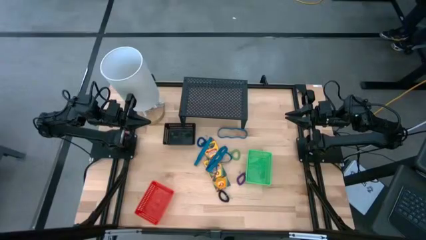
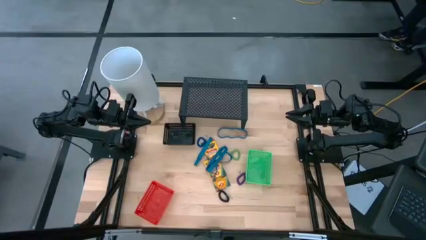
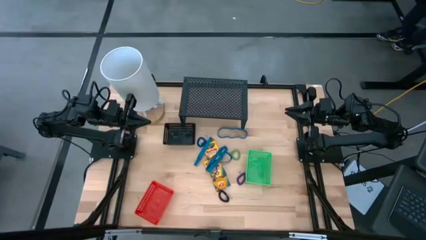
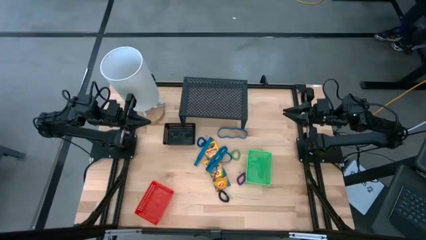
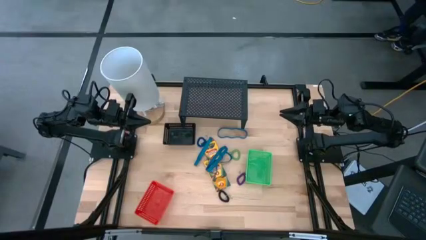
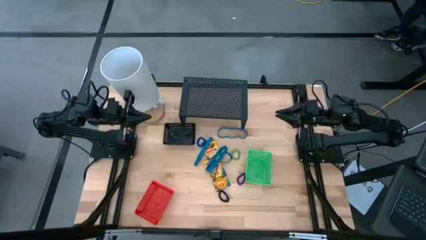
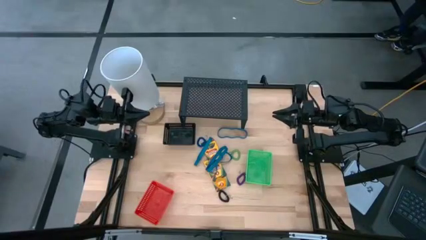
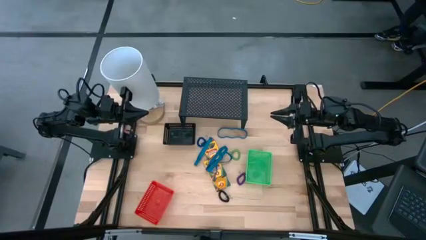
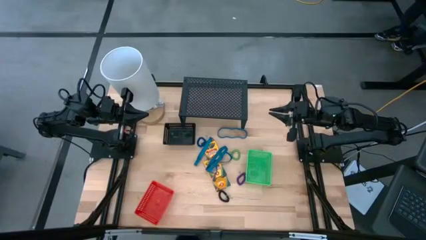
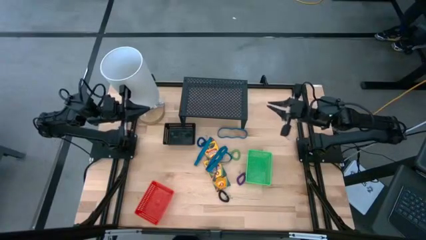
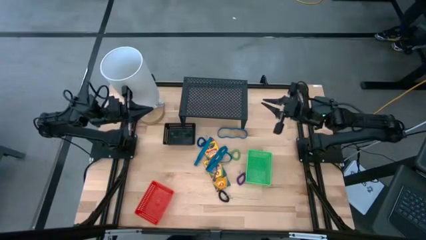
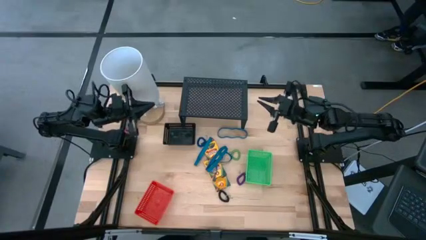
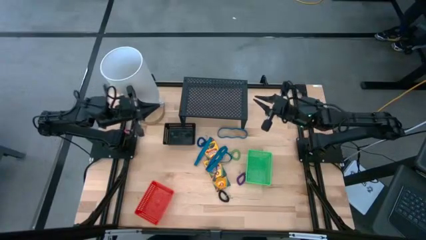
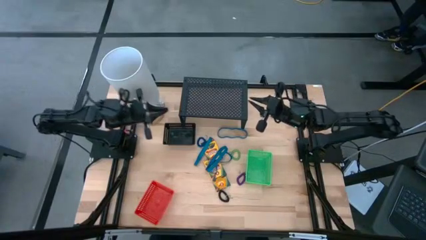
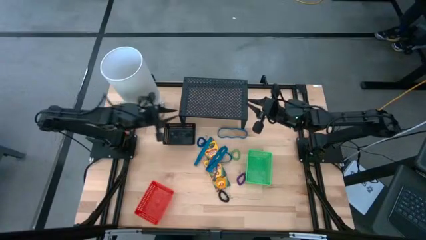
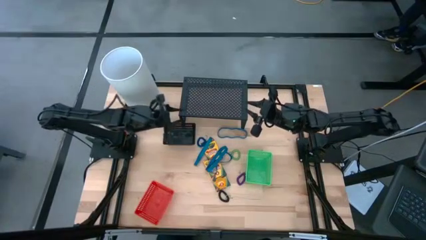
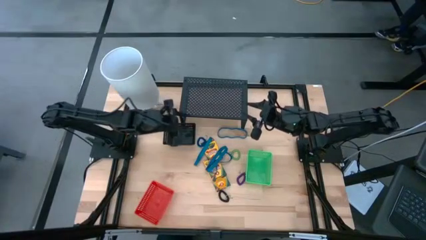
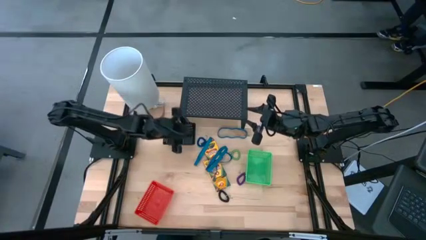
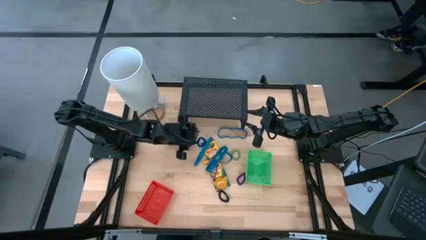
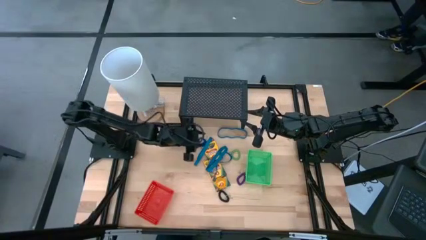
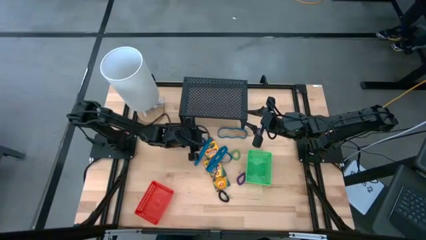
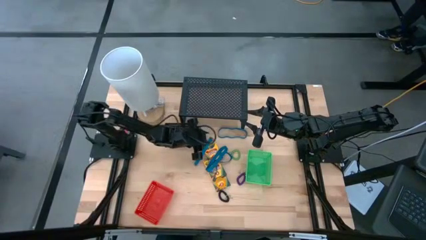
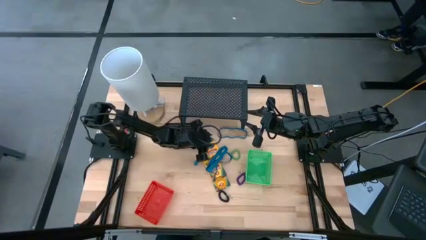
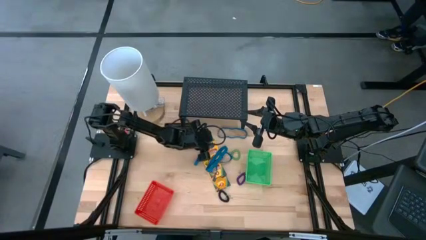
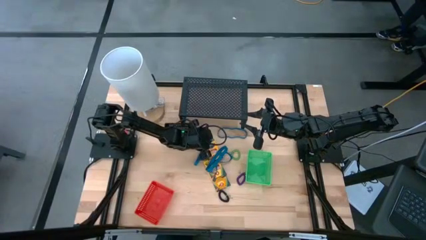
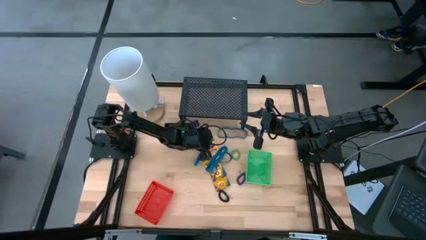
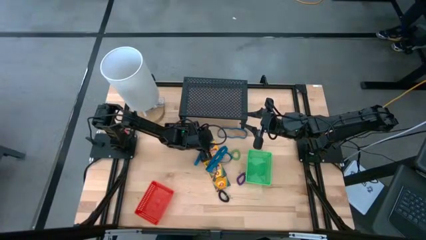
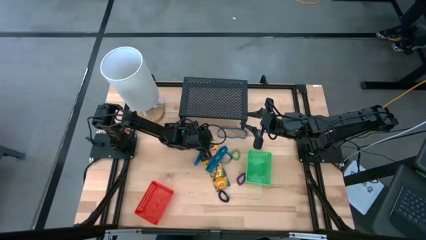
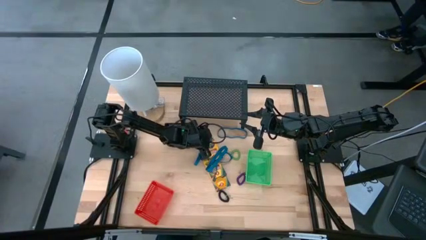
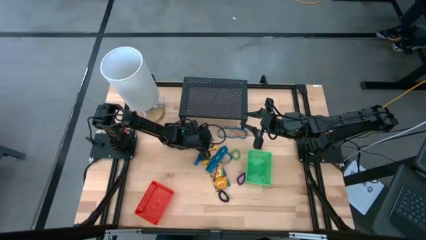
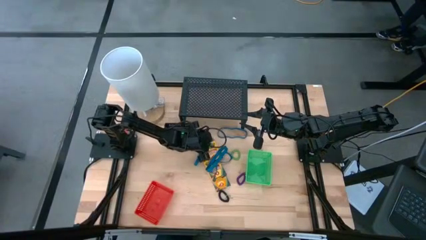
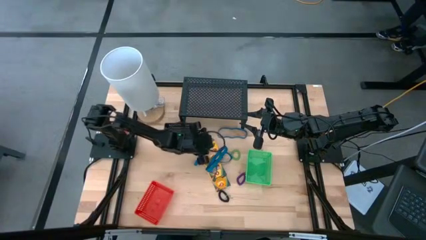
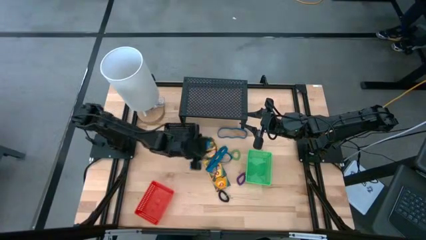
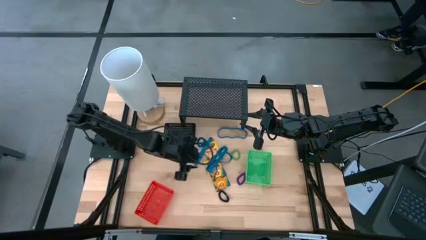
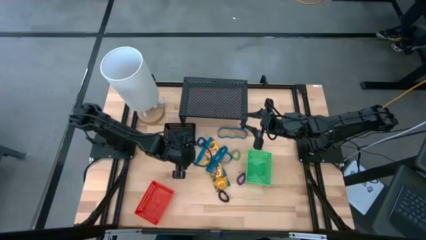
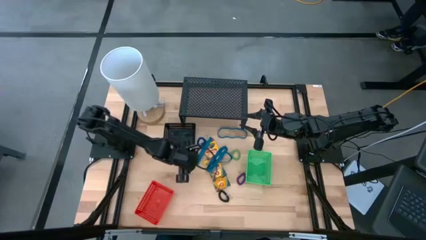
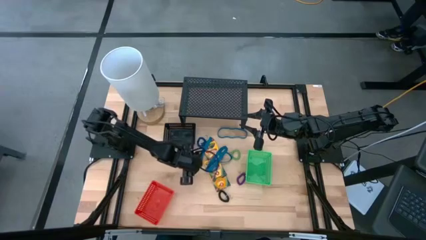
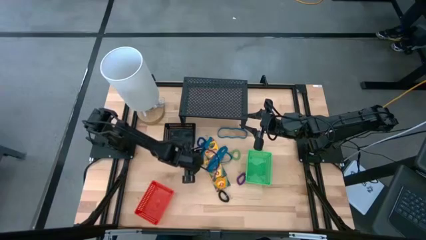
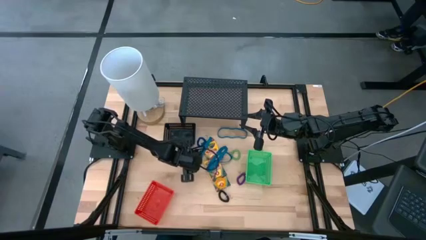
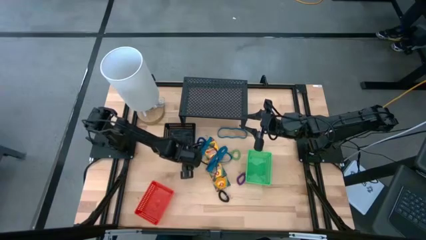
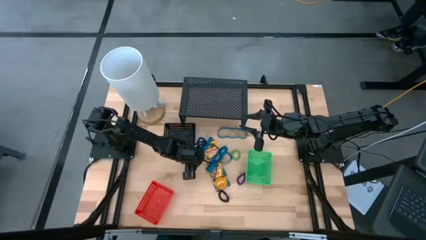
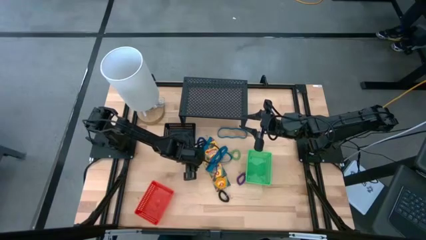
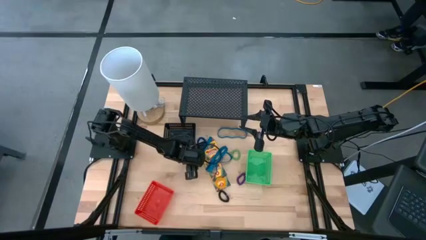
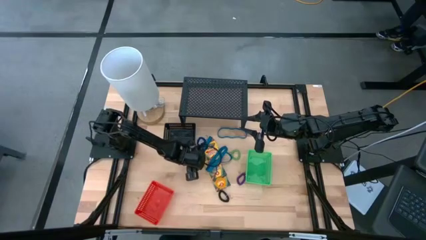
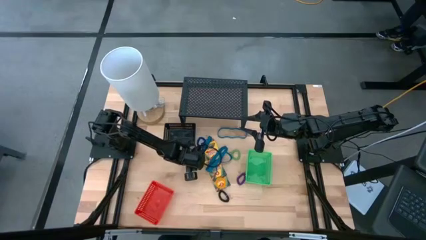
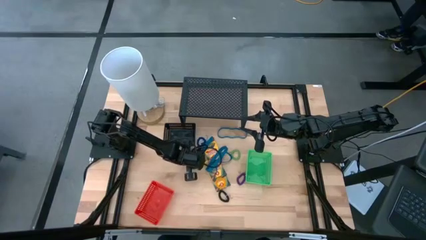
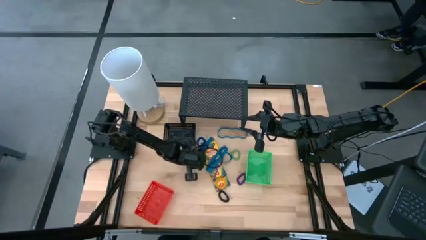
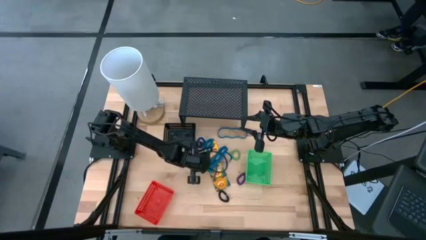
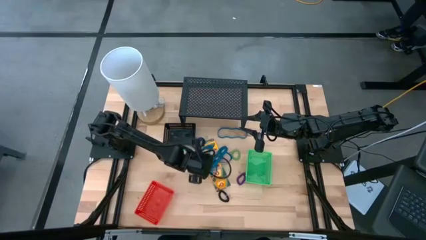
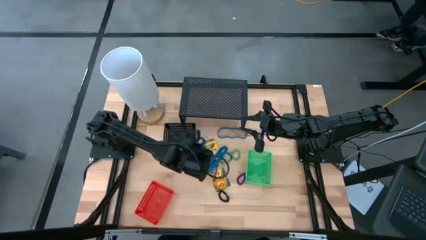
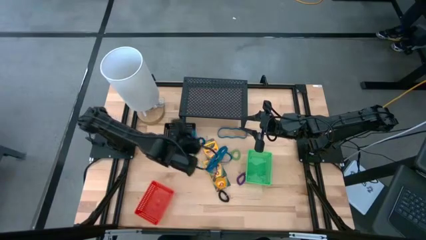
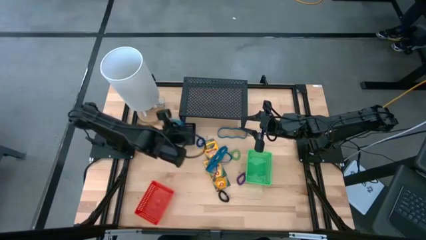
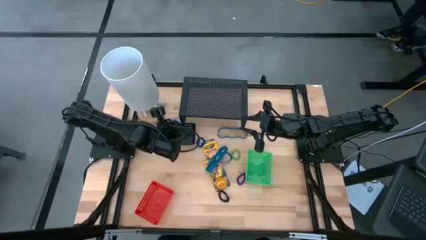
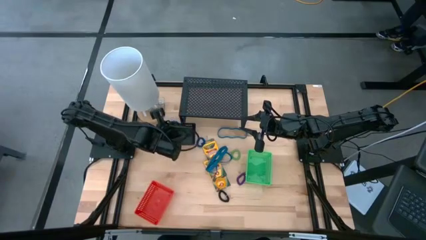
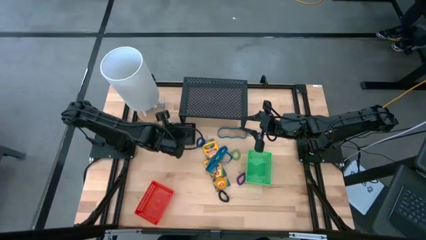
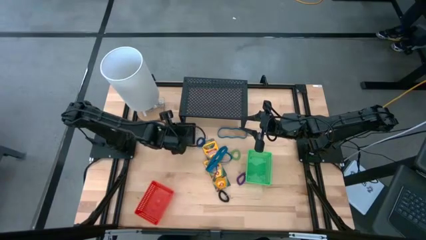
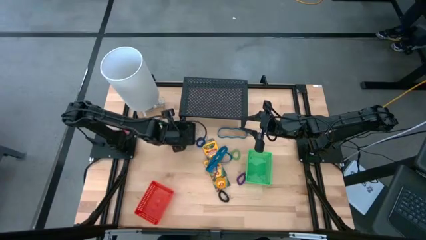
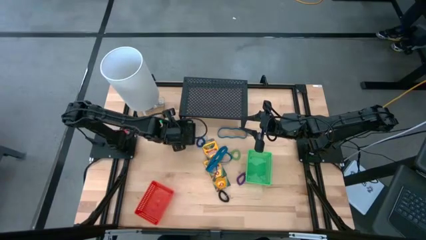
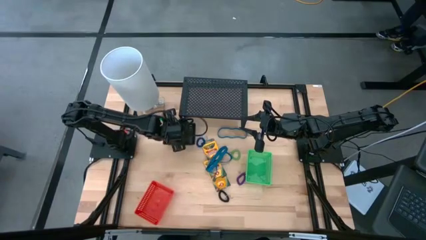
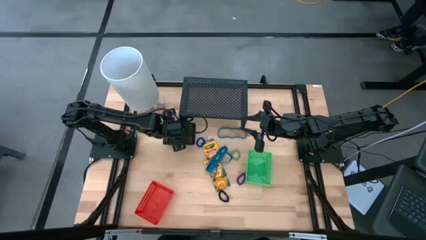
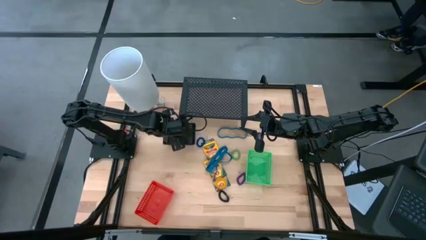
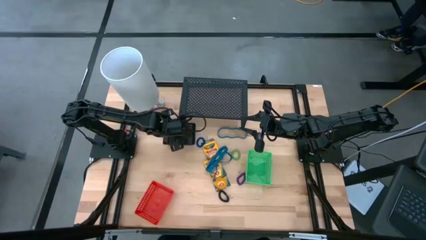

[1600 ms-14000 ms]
Task: Pick & Place Office Desk Supplies
Put the blue rubberband into the black bin

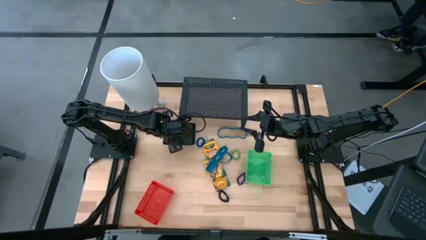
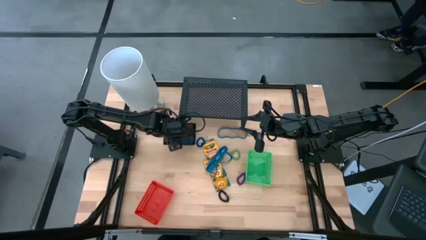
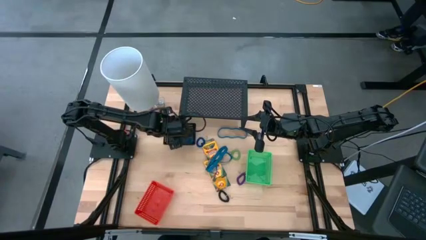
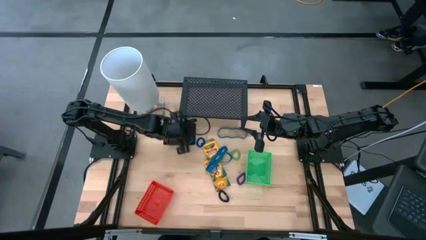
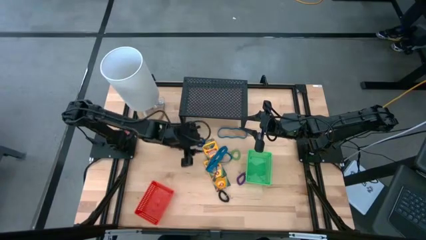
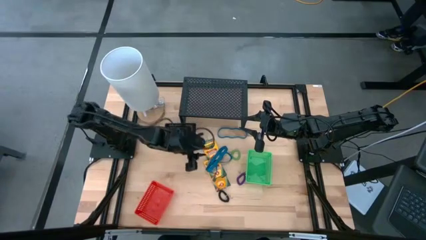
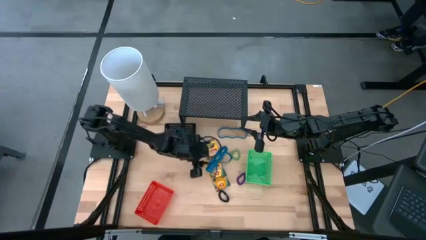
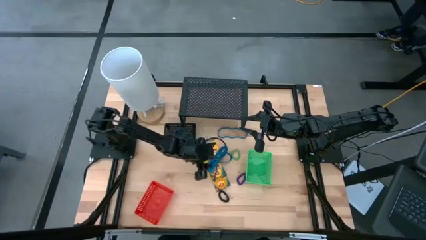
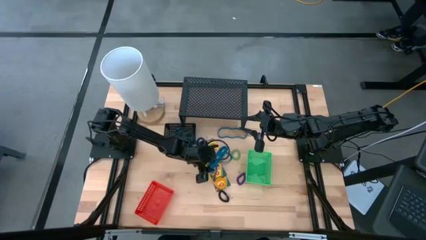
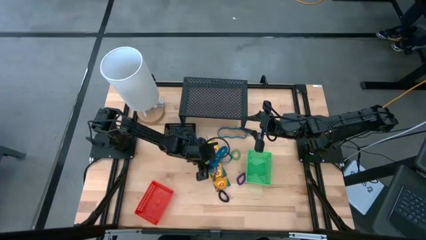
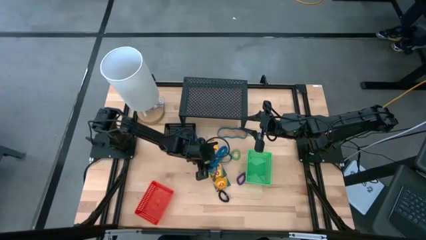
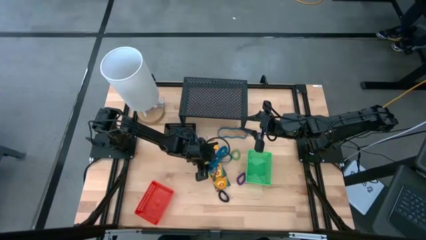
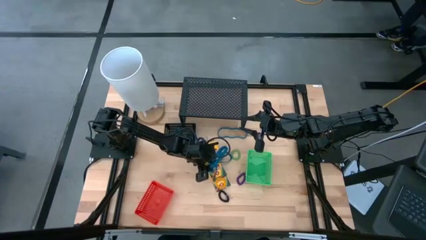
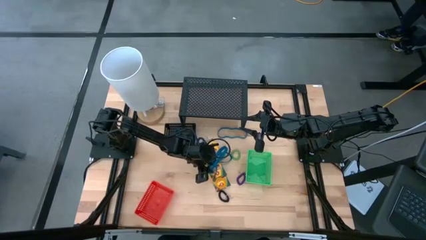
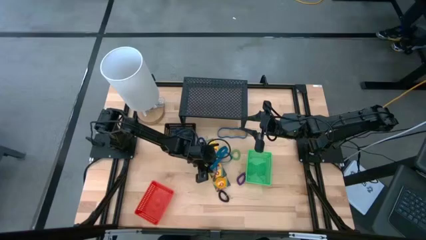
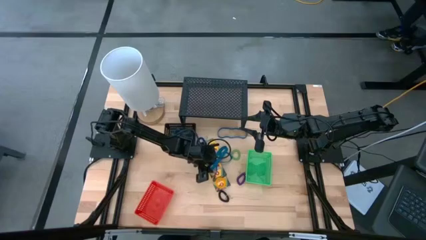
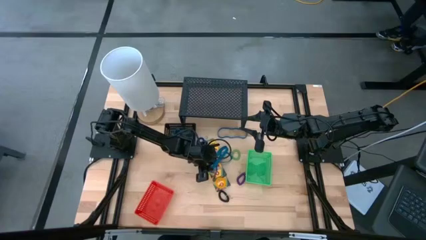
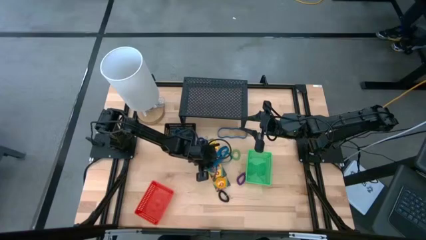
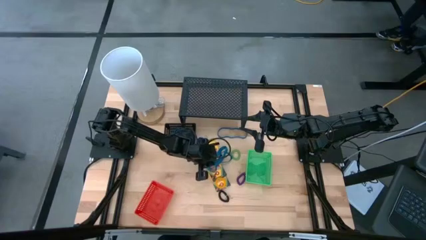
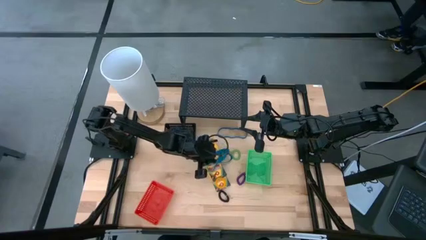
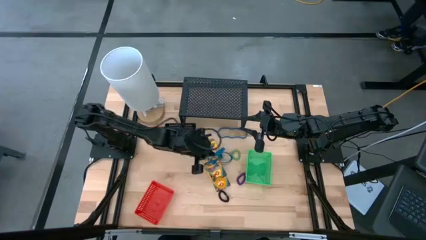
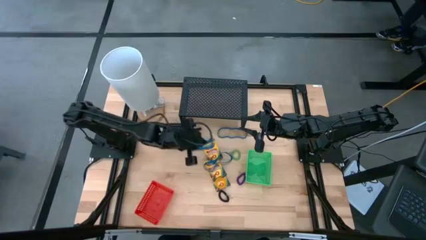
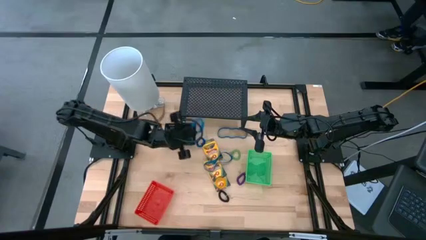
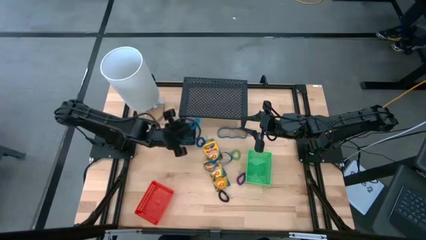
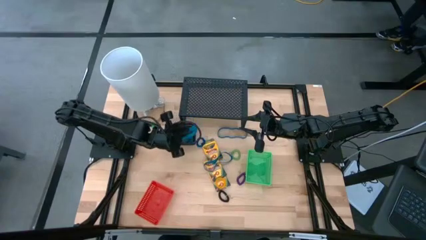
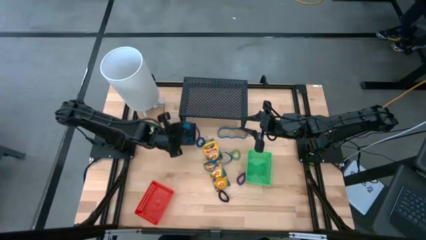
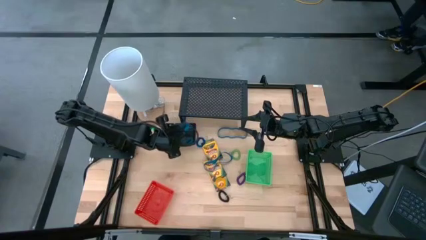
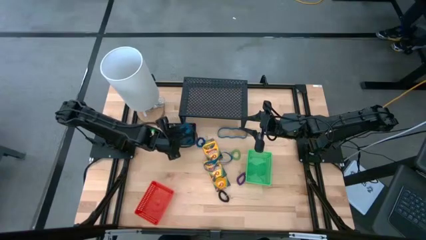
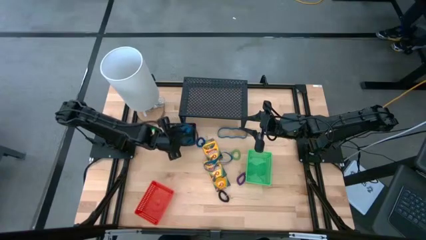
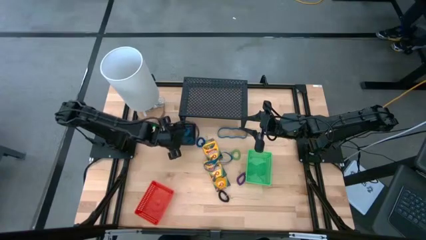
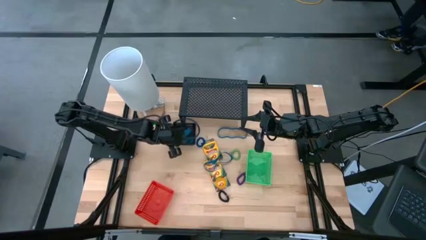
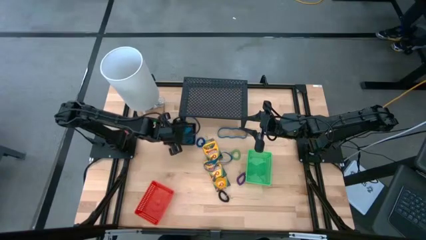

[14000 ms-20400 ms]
Put the blue rubberband into the black bin
